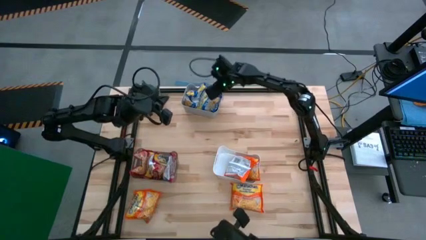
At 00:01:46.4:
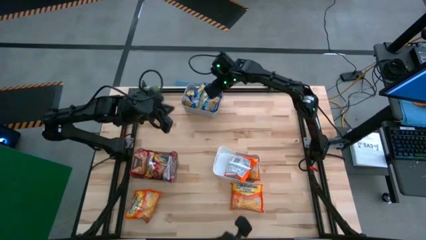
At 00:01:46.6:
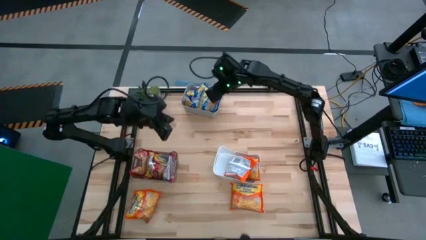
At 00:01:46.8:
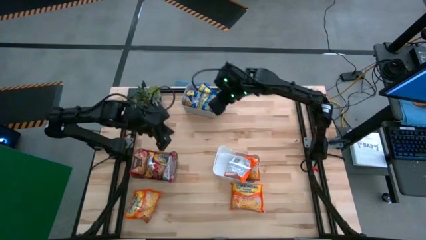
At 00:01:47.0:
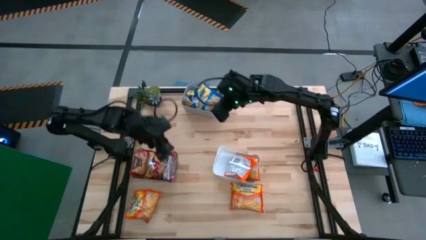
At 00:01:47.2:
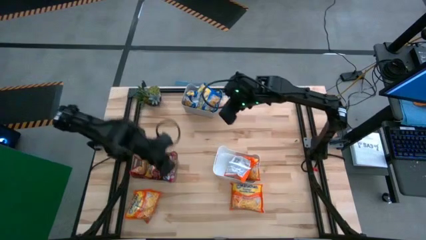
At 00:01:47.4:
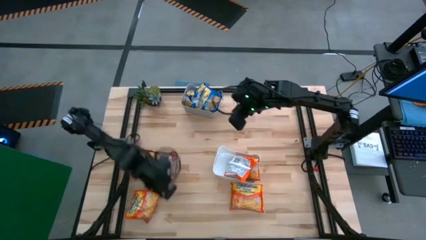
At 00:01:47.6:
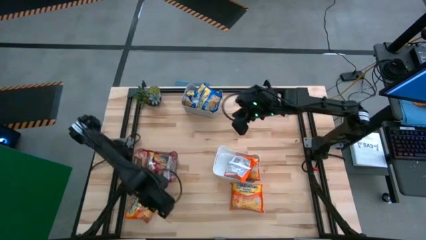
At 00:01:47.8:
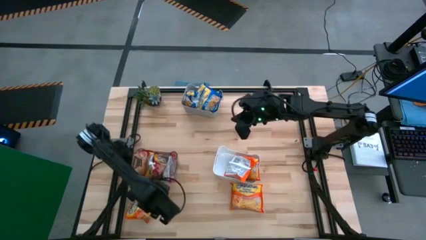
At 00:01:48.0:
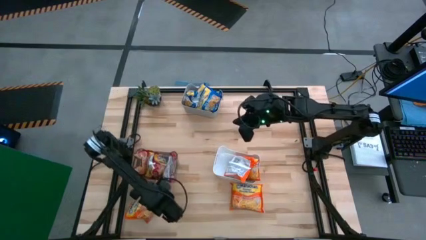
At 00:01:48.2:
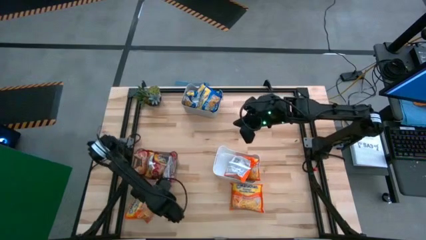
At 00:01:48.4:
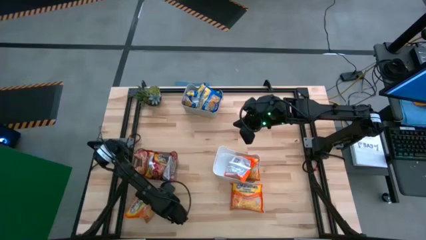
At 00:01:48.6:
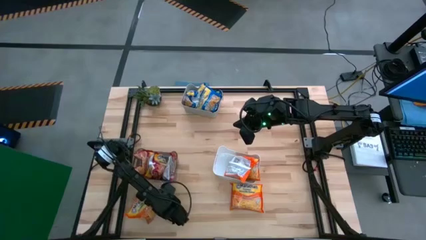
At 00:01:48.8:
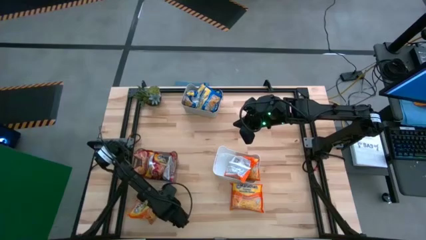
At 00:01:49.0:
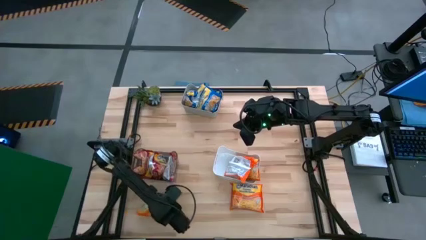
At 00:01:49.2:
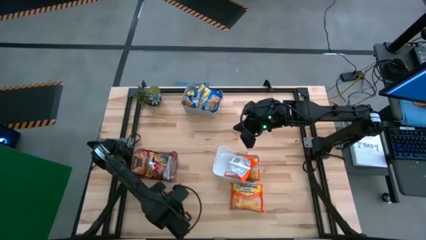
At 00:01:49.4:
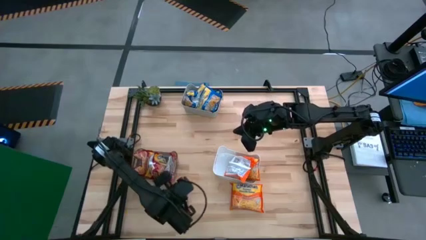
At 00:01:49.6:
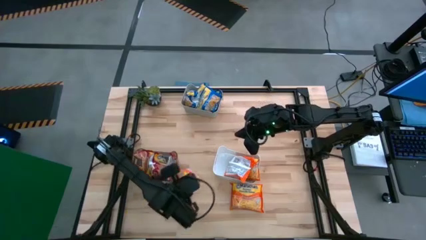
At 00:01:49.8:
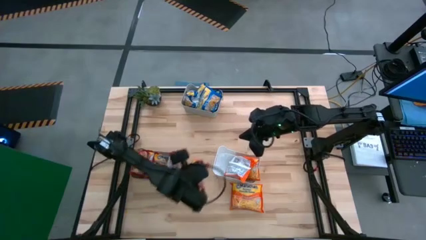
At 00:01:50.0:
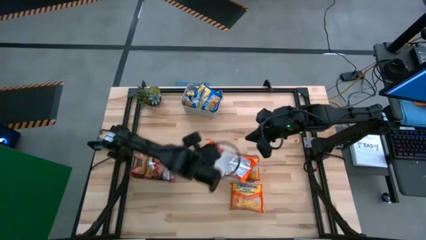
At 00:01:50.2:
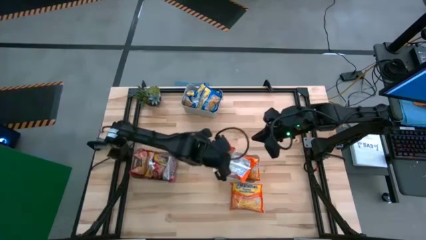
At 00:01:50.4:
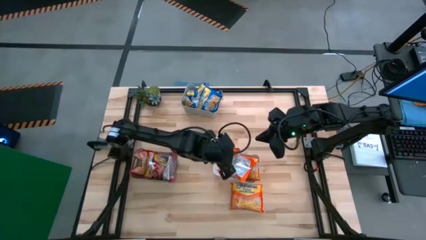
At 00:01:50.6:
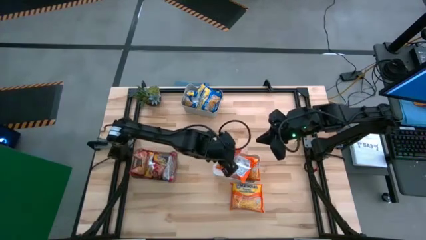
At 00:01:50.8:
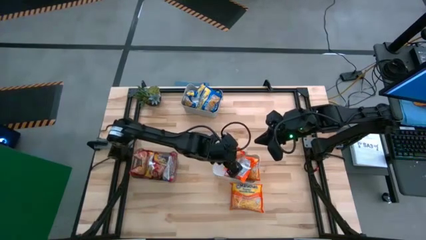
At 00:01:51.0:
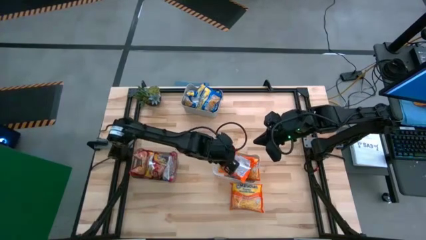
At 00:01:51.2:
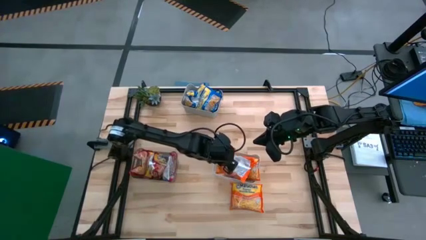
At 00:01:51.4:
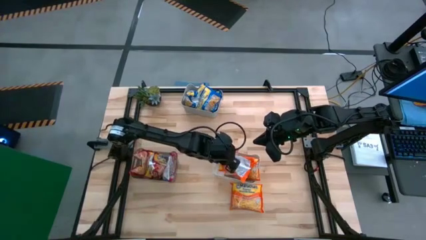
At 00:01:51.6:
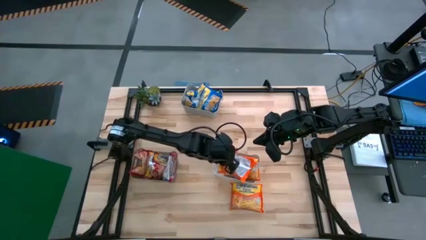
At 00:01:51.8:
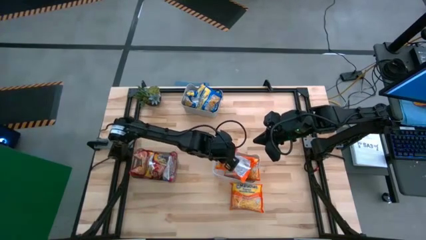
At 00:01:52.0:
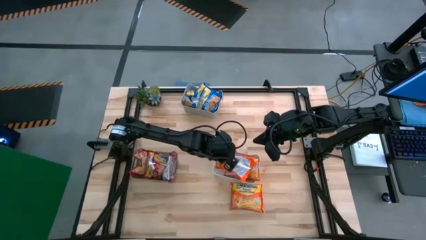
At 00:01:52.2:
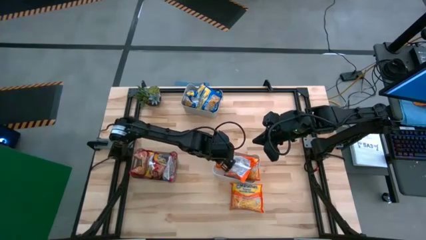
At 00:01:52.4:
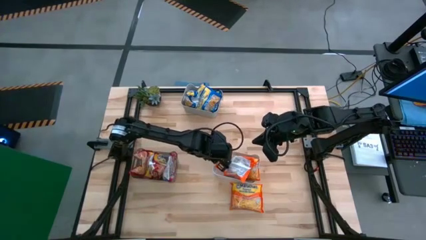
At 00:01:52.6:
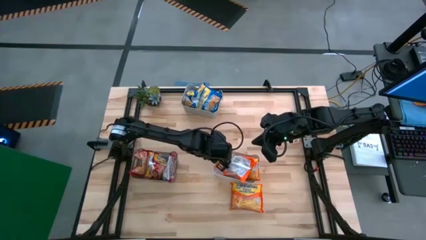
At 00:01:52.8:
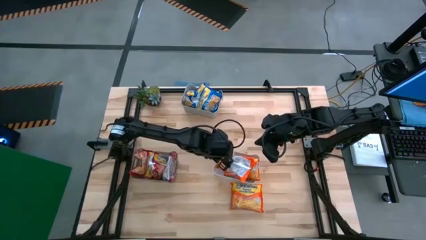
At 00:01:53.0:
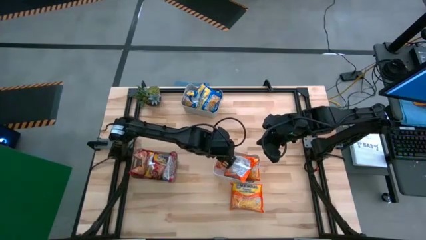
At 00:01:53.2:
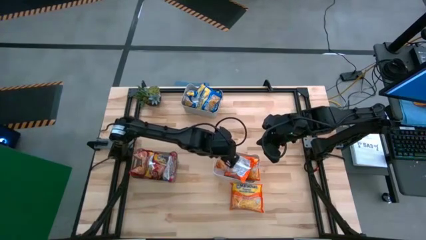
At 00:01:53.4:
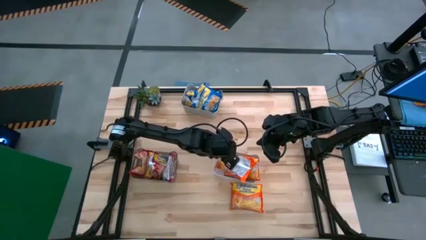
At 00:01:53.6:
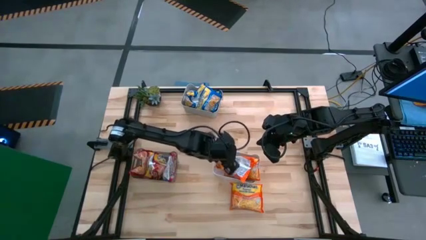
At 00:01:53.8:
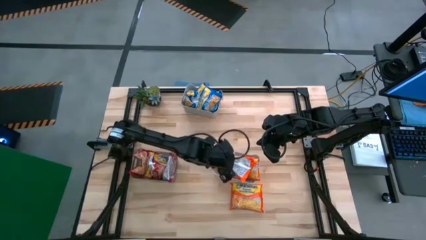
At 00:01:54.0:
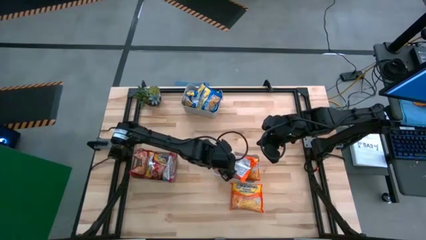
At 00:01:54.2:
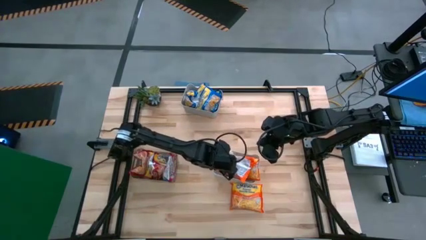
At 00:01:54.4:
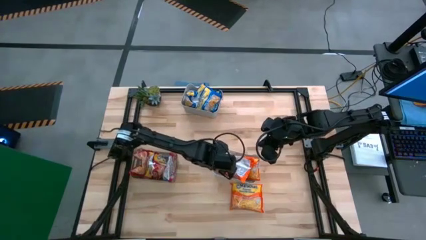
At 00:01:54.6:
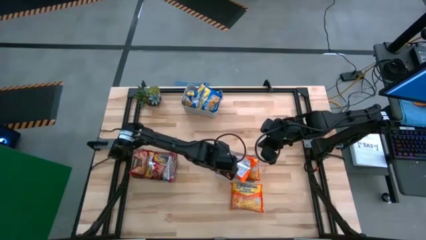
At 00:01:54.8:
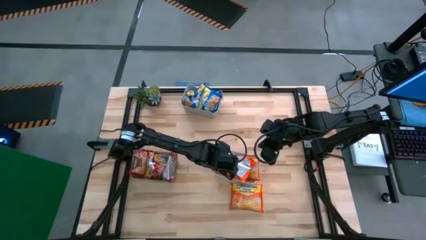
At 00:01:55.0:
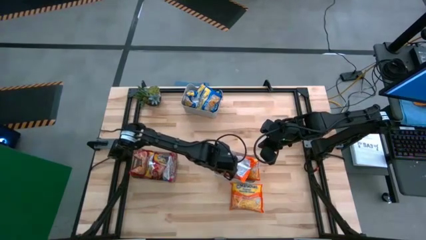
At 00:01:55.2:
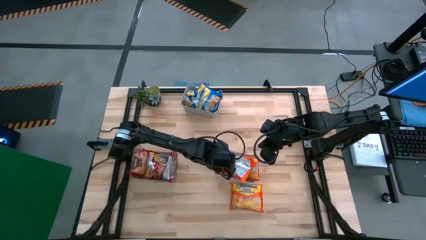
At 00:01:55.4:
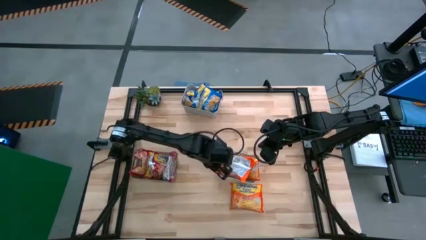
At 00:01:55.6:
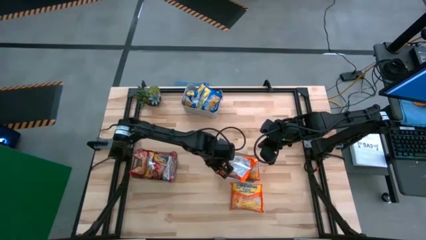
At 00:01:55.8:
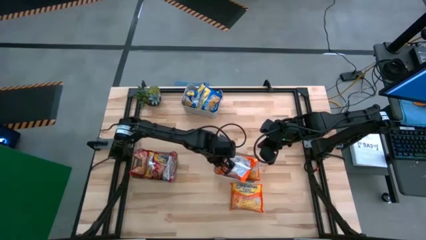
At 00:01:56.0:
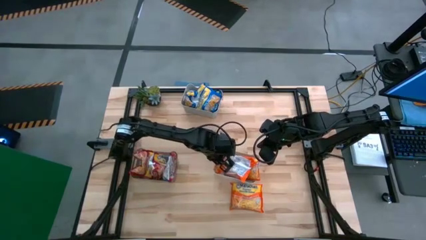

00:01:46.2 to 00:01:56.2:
Task: Sort Maruchan noodles
Put the orange noodle pack into the white bin
